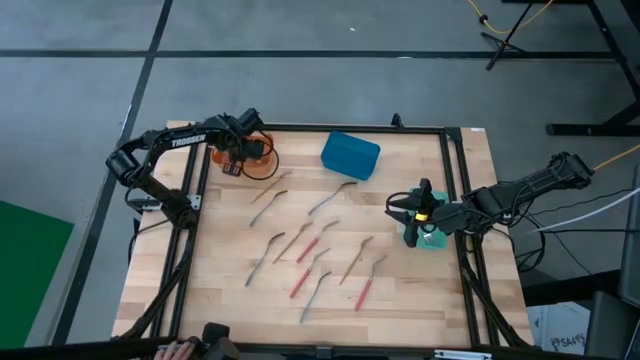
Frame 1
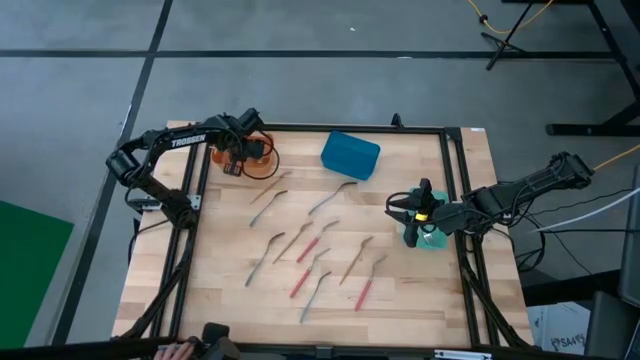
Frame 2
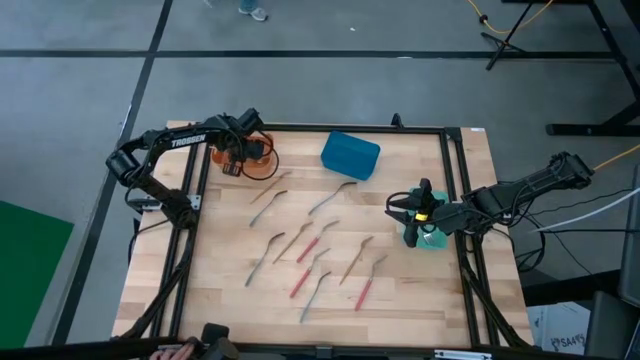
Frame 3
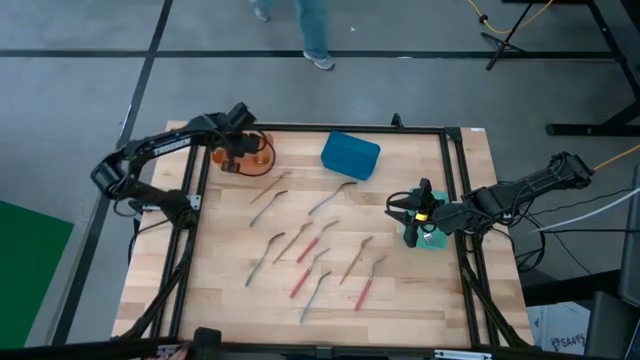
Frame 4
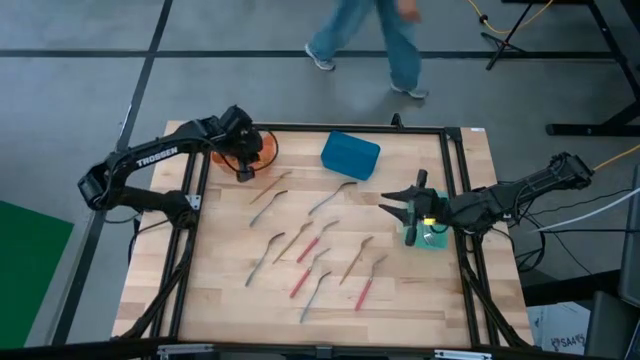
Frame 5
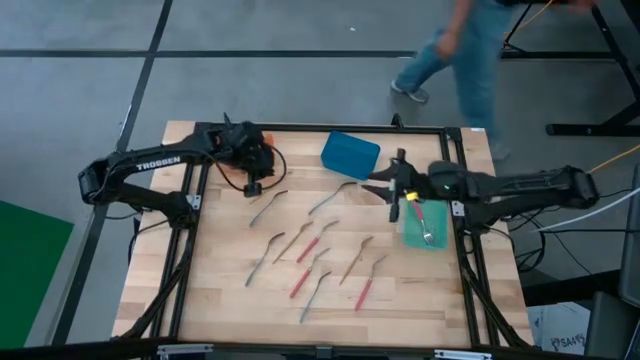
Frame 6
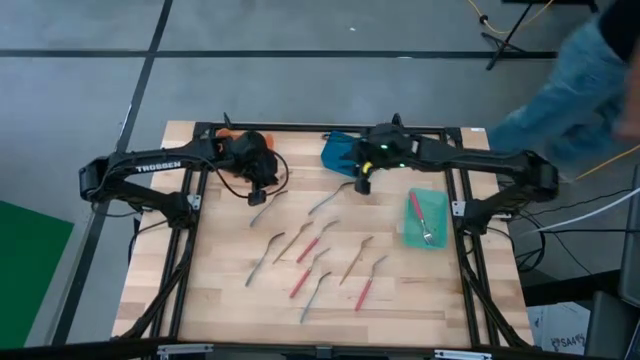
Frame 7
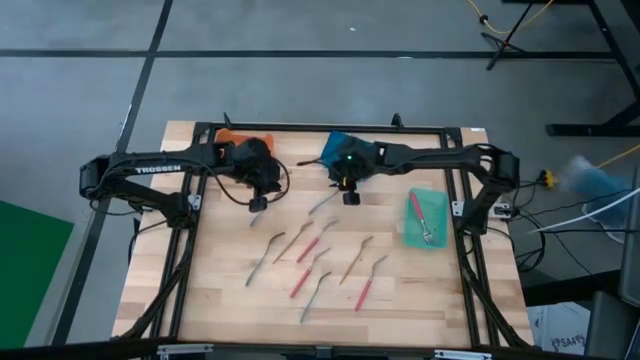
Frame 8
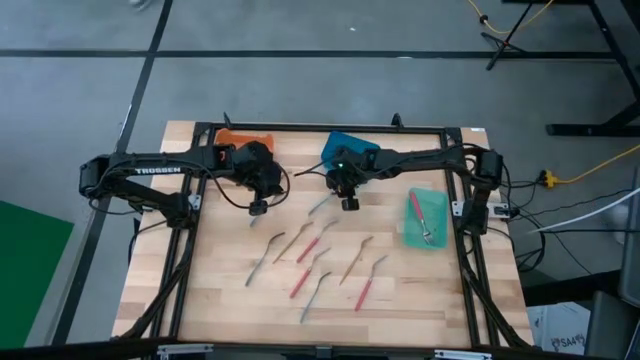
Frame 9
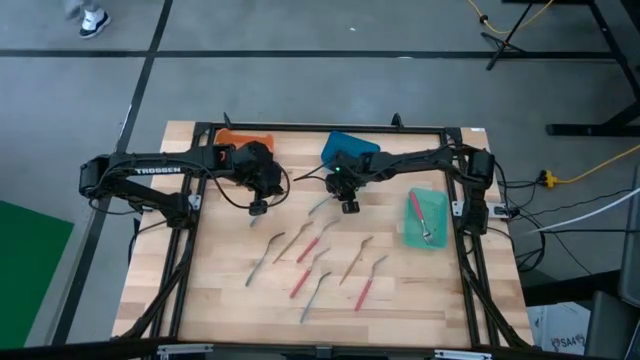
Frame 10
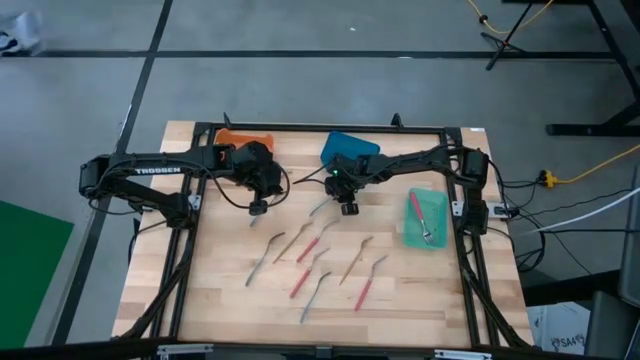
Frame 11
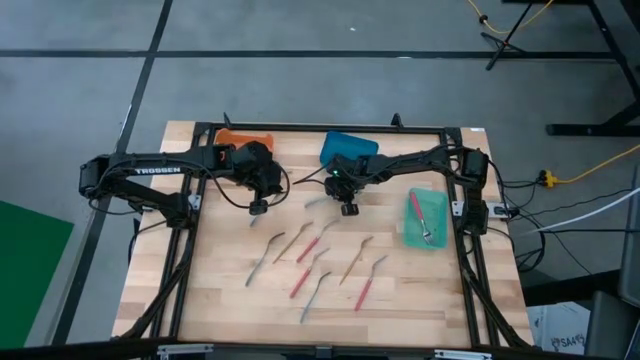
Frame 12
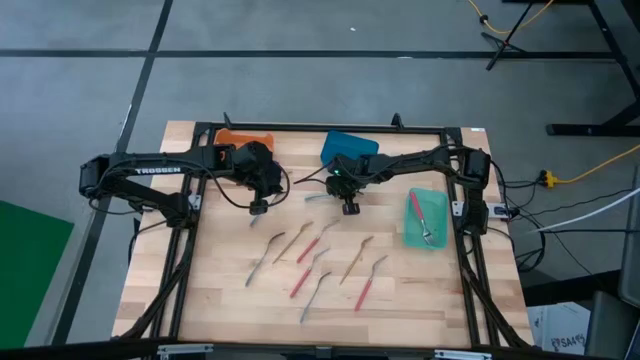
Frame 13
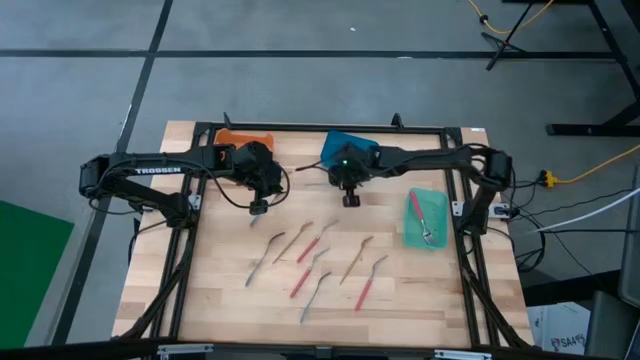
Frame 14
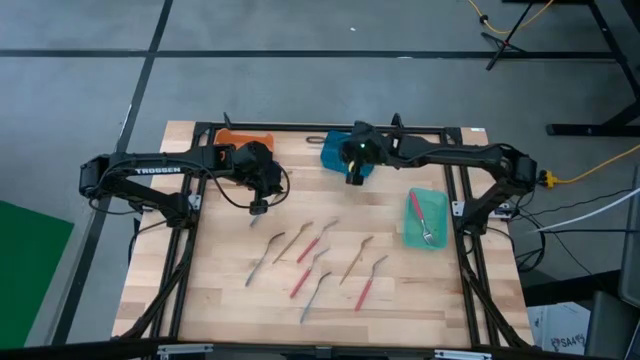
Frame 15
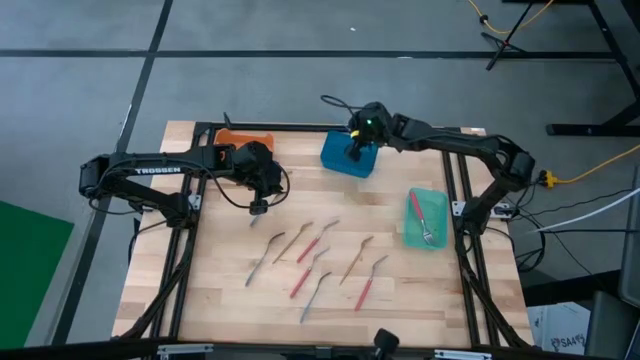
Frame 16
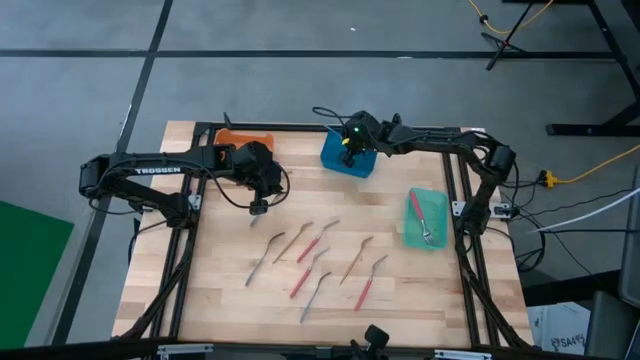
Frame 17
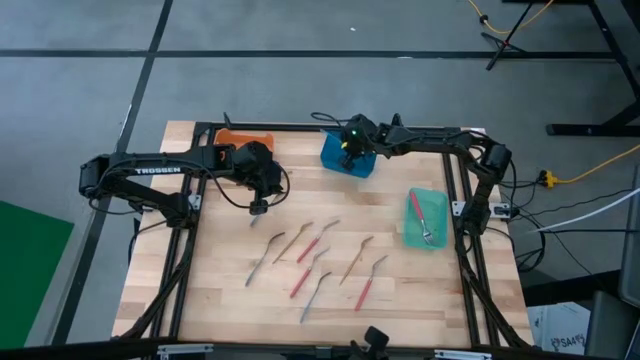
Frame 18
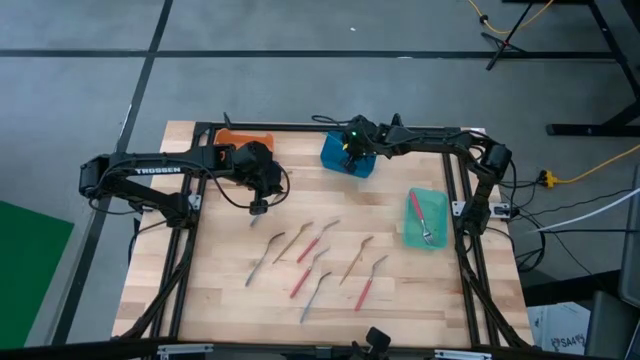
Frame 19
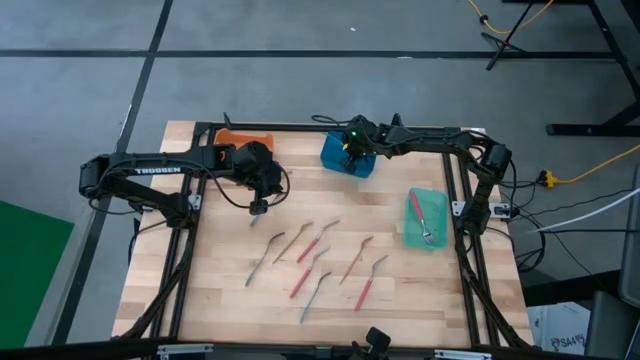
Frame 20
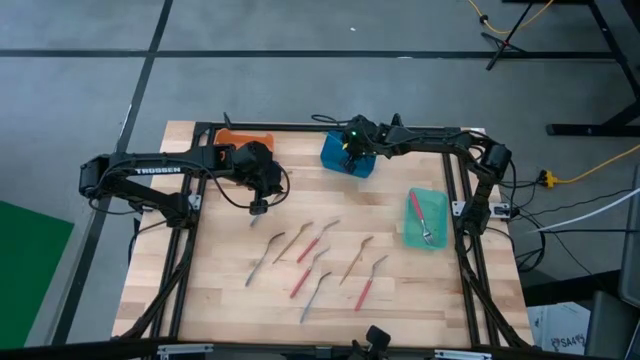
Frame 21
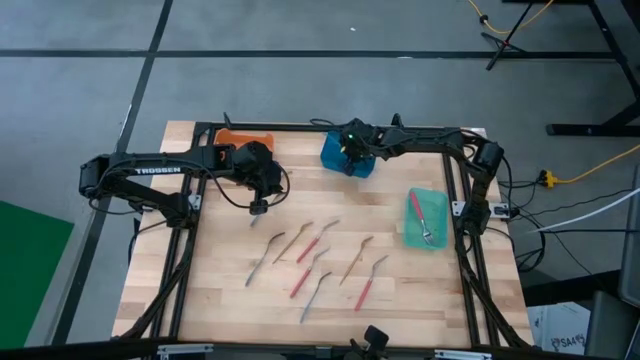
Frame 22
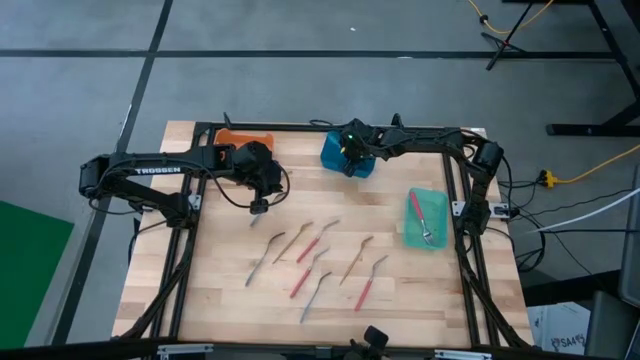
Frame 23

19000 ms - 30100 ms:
Task: Sort silverware by color (type)
Put the blue fork into the blue bin

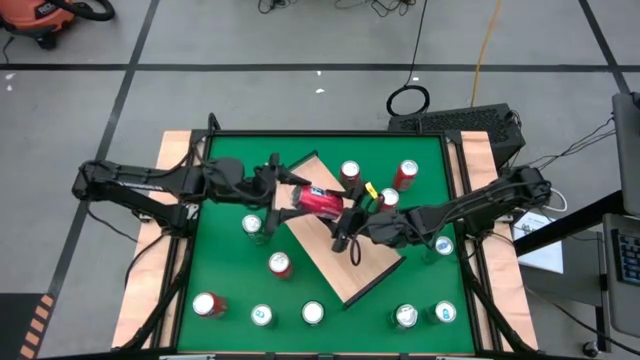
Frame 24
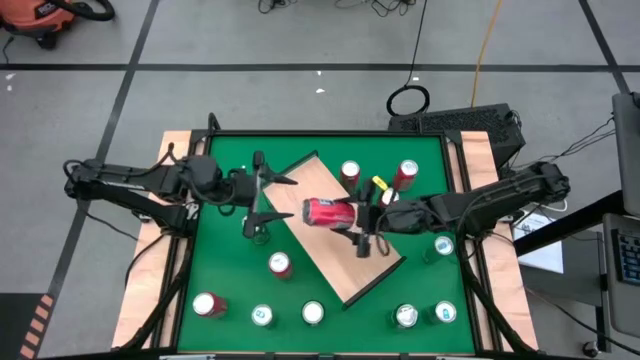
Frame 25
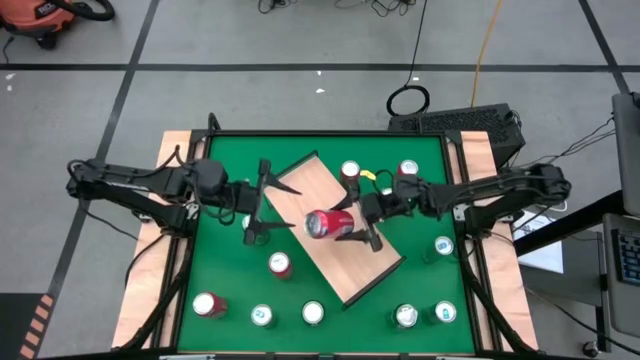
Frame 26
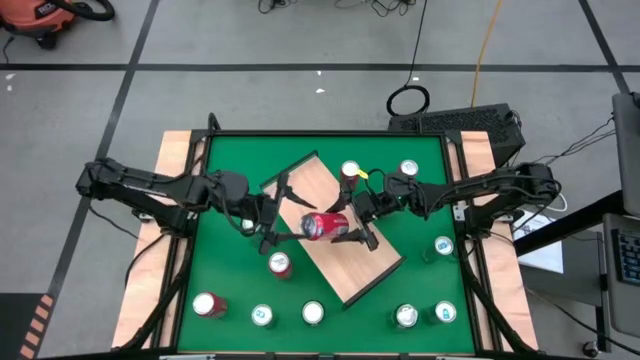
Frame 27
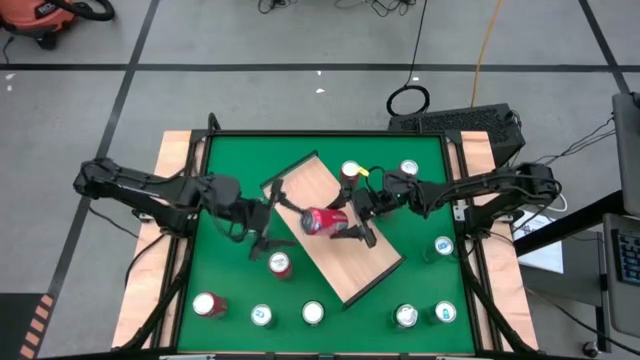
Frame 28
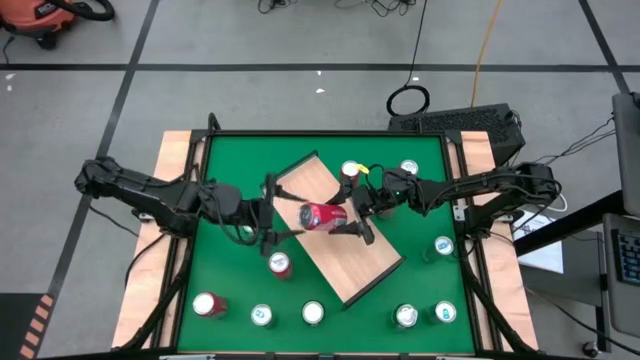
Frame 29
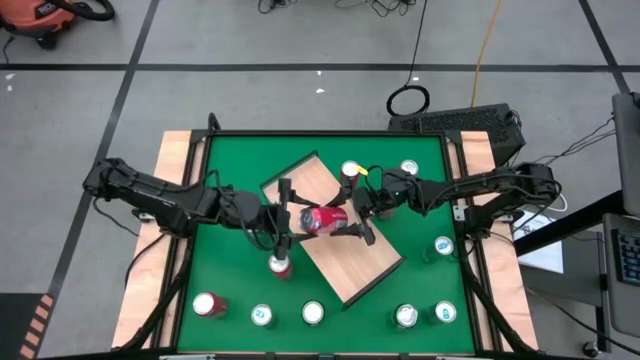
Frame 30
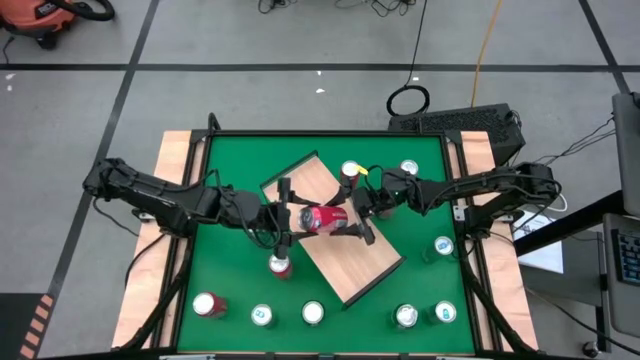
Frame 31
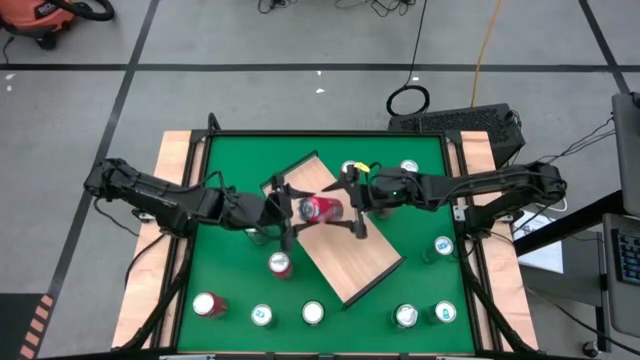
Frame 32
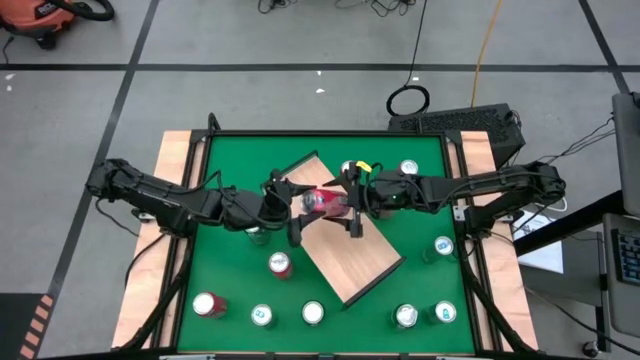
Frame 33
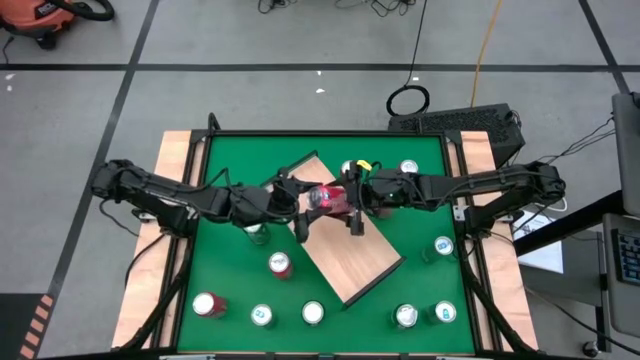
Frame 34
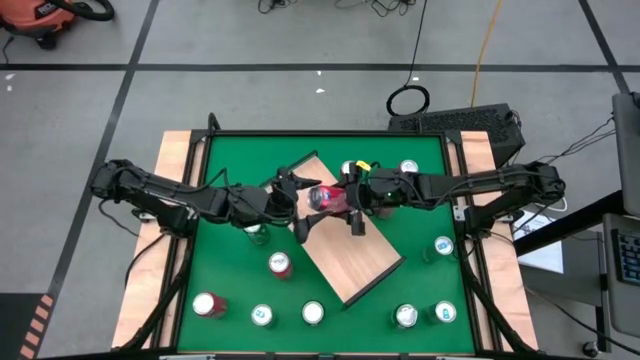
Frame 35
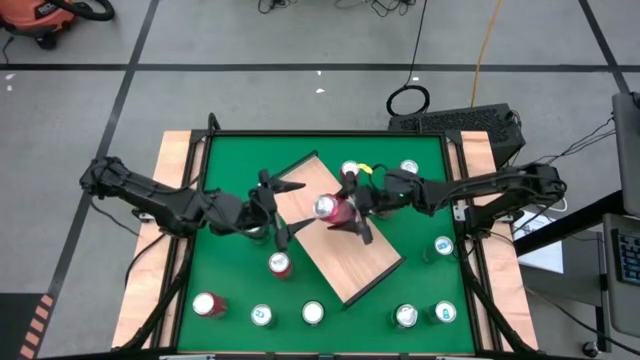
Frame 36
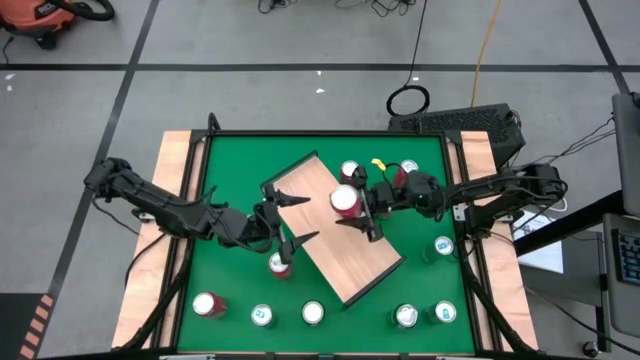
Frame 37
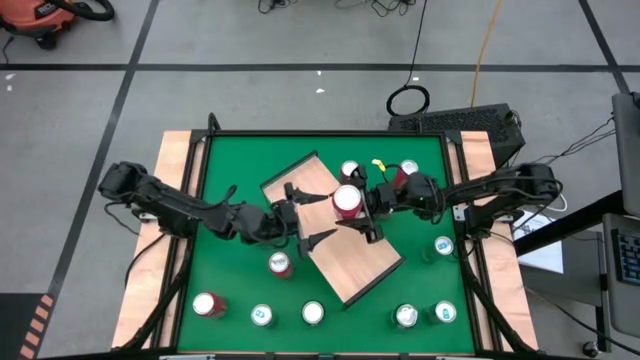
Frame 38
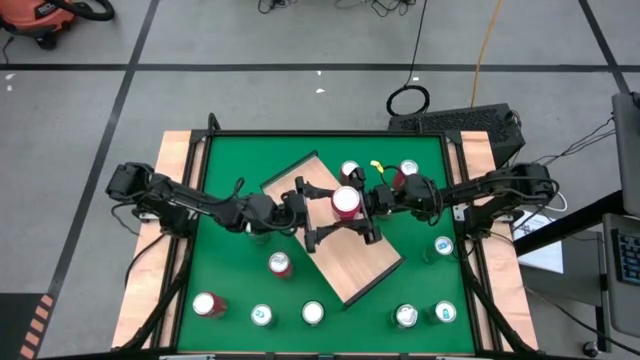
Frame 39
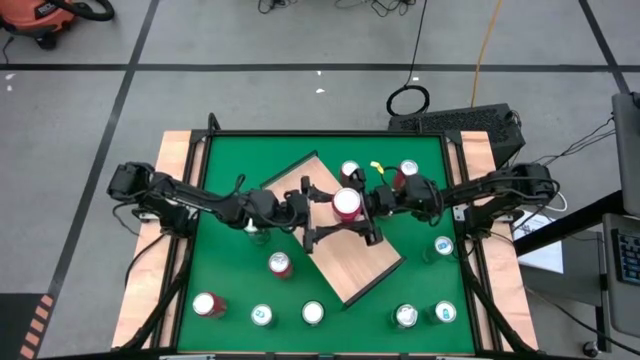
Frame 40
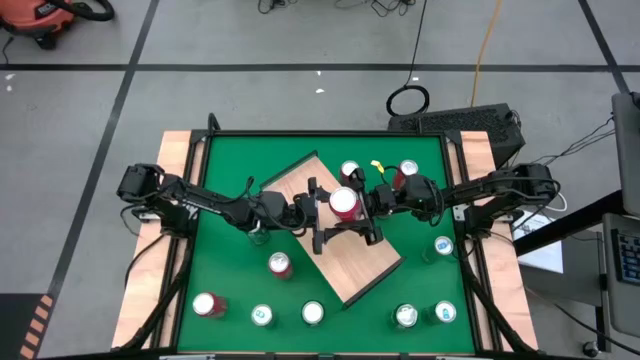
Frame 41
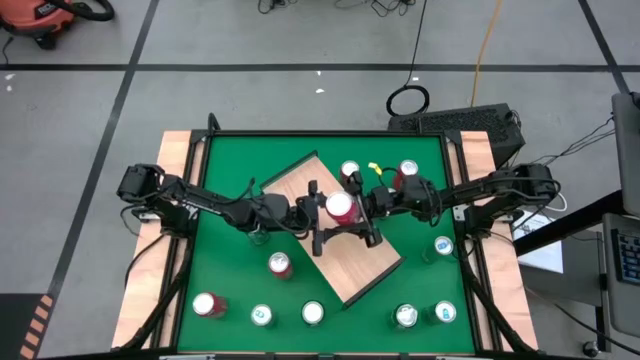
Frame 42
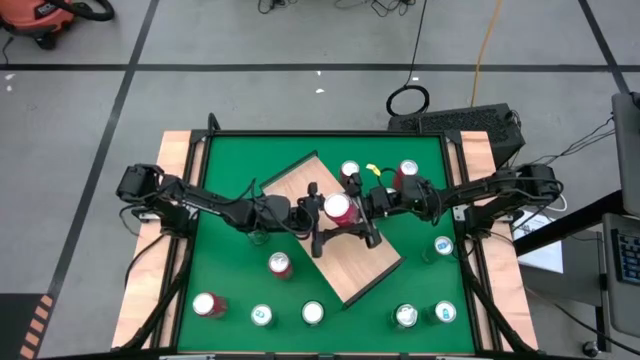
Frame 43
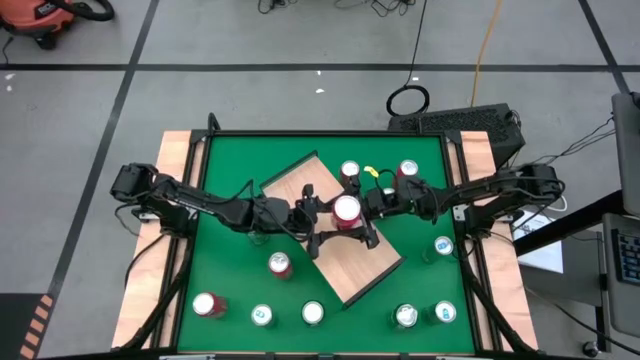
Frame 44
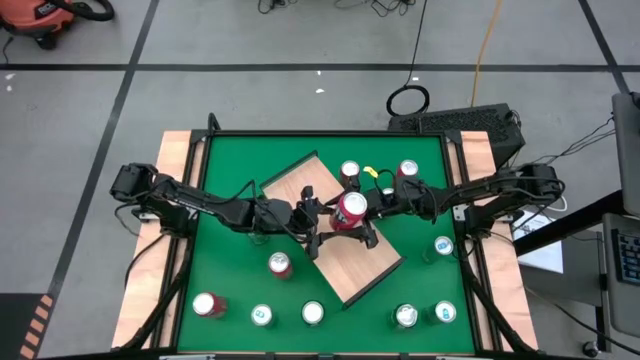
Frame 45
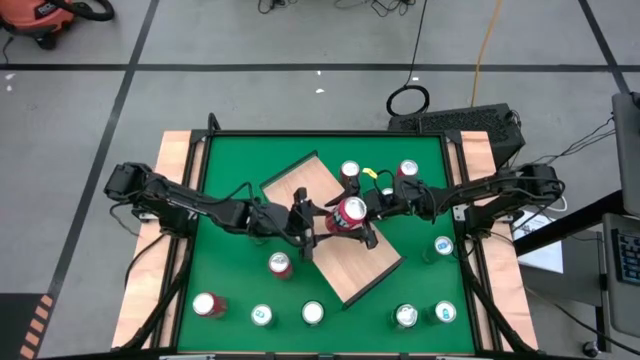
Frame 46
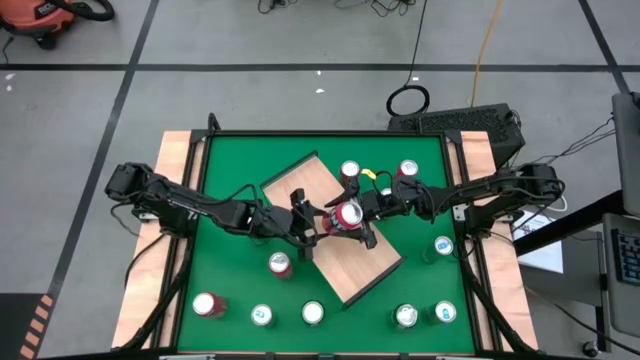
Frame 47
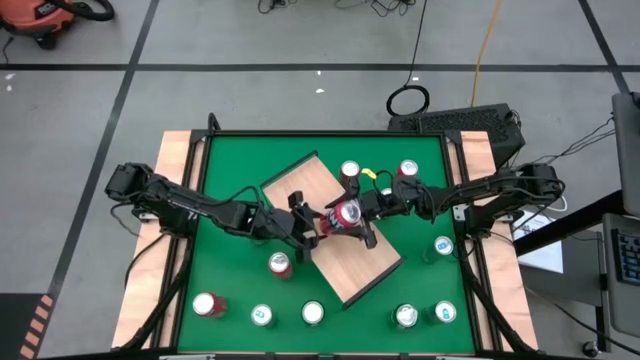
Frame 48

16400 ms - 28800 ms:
Task: Place canned beverage on shelf
Put the red soda can on the shelf
